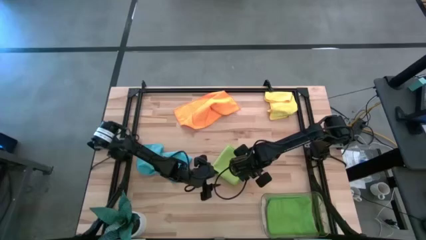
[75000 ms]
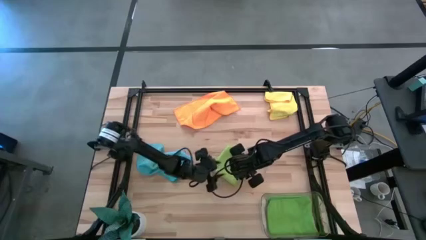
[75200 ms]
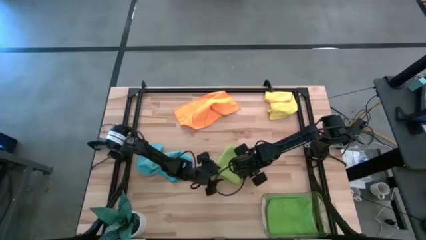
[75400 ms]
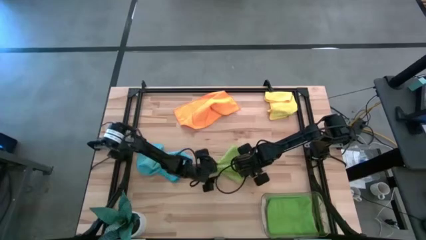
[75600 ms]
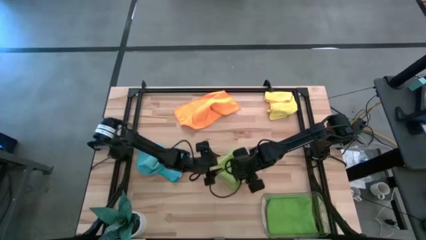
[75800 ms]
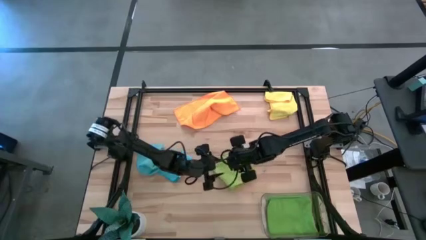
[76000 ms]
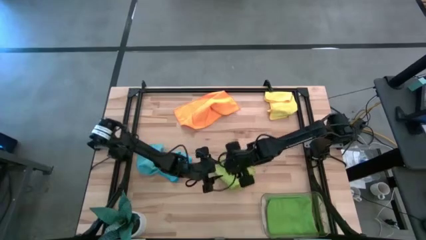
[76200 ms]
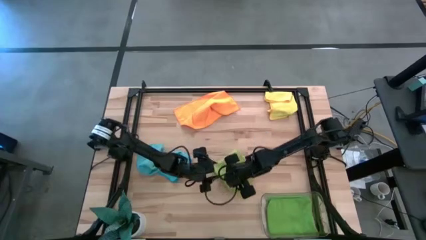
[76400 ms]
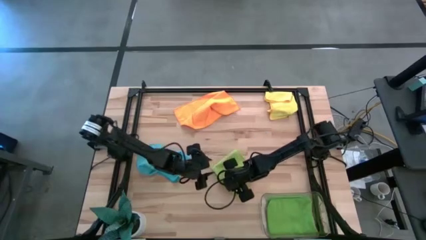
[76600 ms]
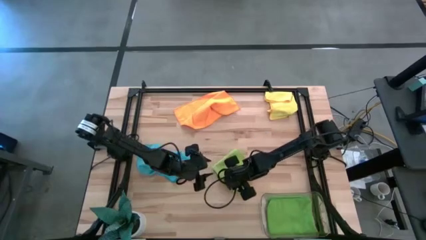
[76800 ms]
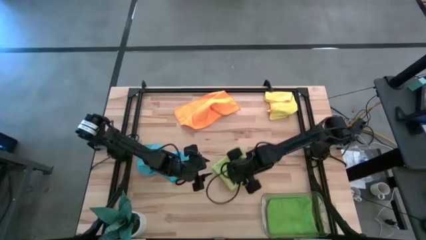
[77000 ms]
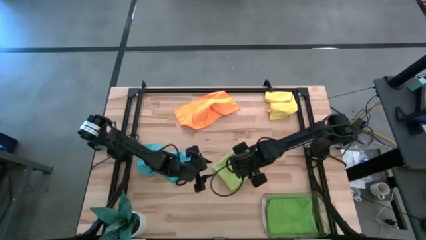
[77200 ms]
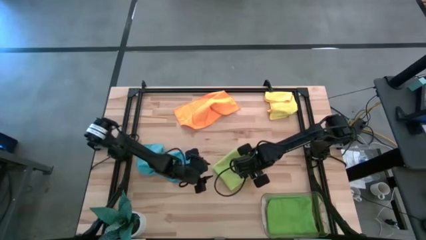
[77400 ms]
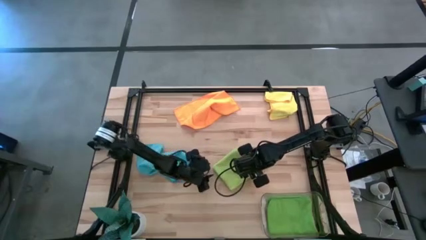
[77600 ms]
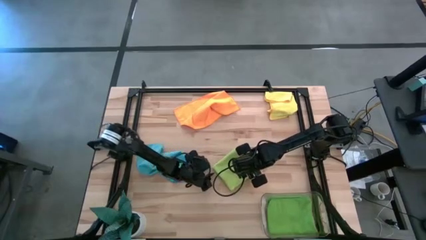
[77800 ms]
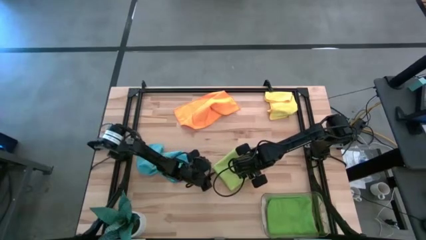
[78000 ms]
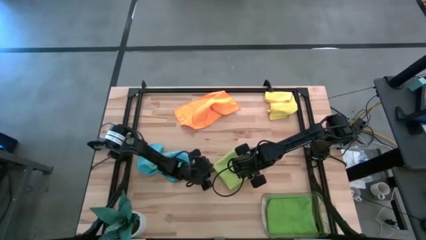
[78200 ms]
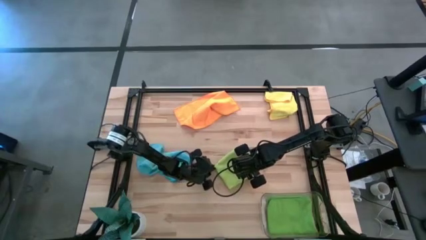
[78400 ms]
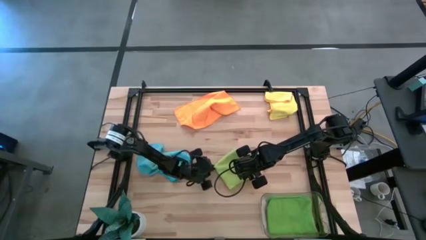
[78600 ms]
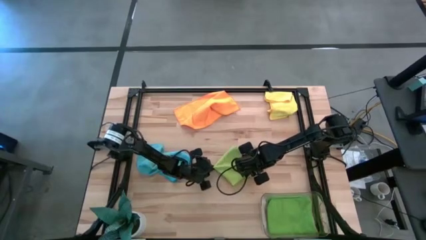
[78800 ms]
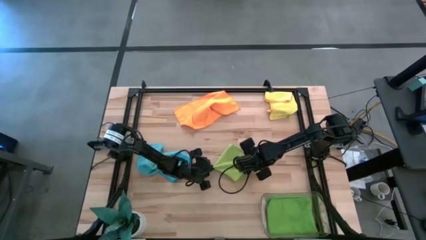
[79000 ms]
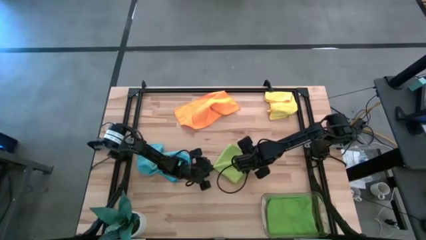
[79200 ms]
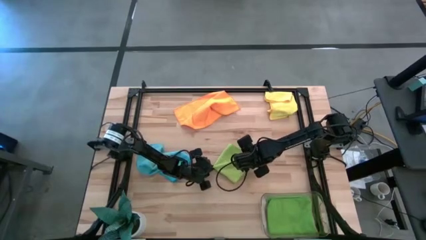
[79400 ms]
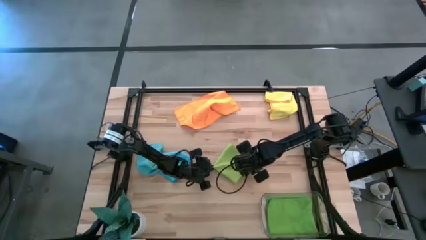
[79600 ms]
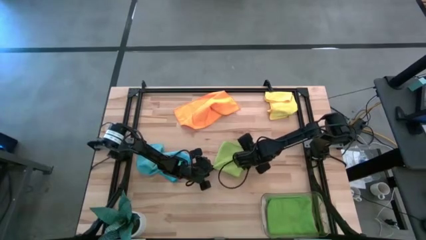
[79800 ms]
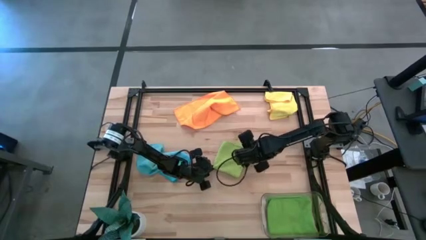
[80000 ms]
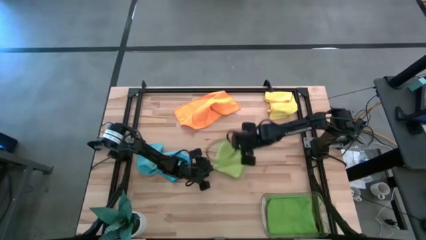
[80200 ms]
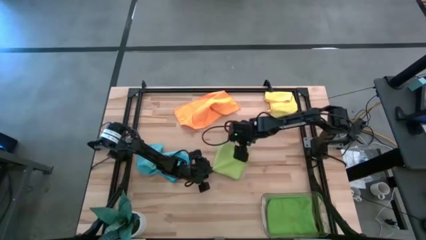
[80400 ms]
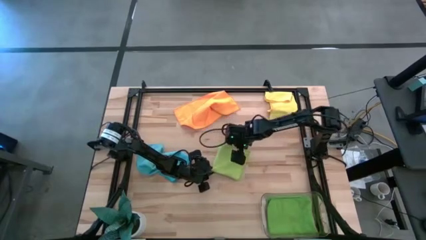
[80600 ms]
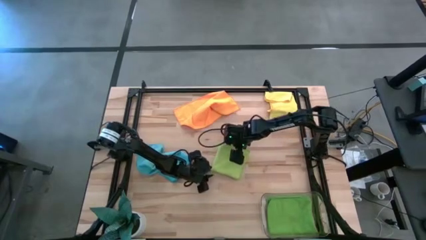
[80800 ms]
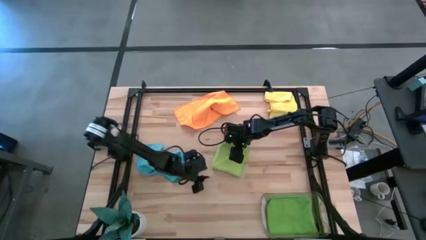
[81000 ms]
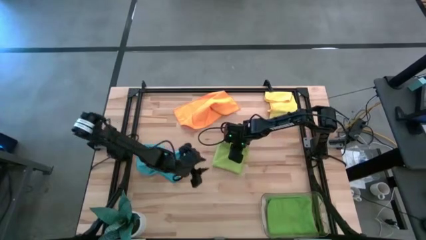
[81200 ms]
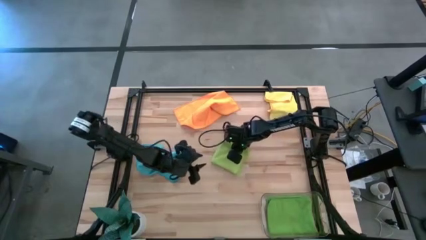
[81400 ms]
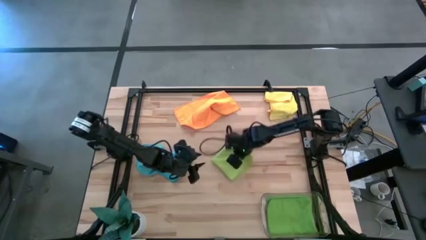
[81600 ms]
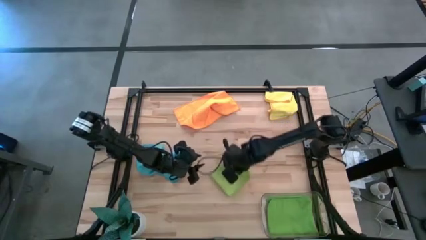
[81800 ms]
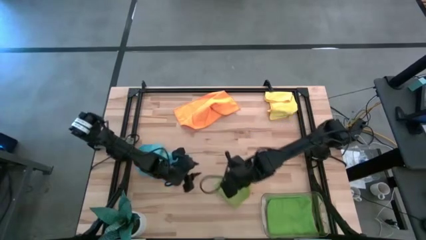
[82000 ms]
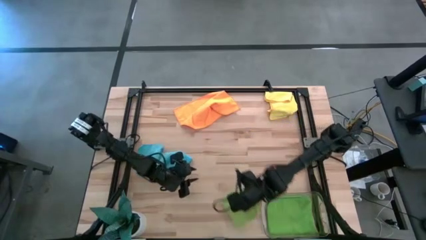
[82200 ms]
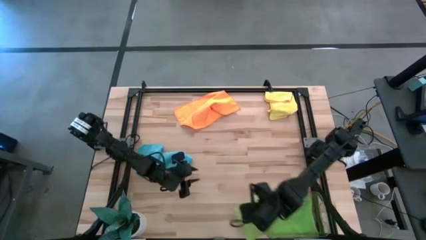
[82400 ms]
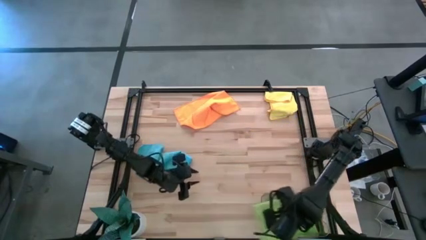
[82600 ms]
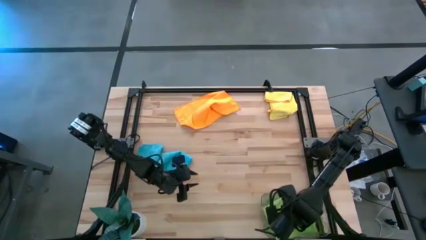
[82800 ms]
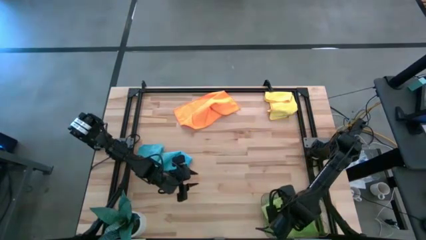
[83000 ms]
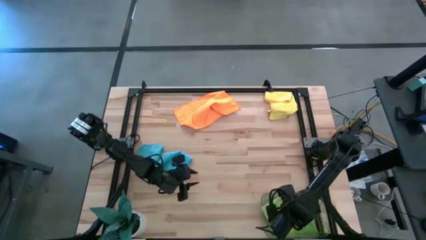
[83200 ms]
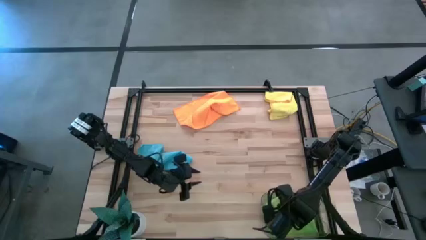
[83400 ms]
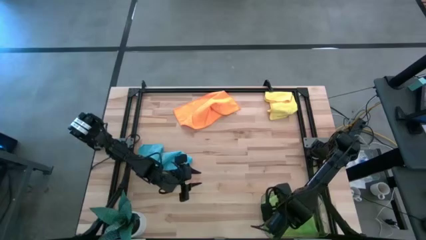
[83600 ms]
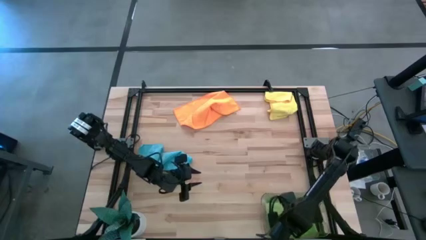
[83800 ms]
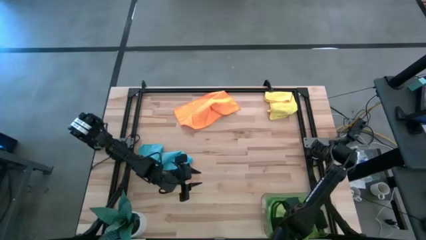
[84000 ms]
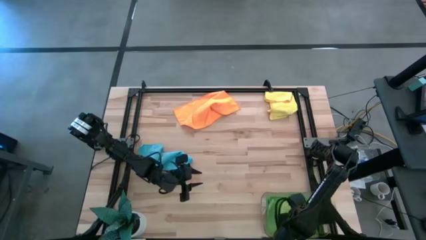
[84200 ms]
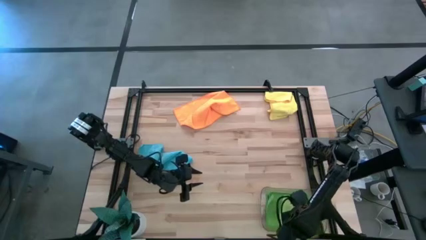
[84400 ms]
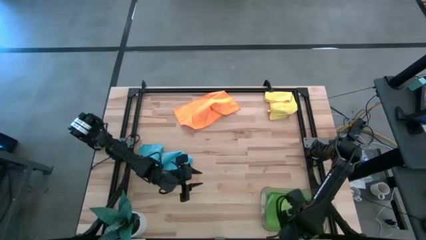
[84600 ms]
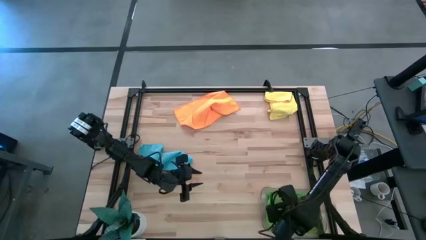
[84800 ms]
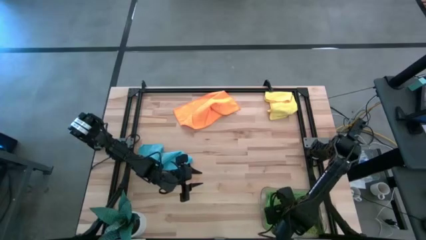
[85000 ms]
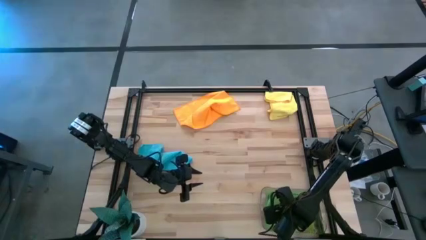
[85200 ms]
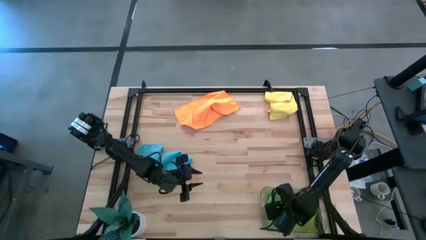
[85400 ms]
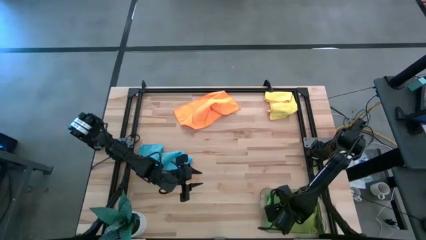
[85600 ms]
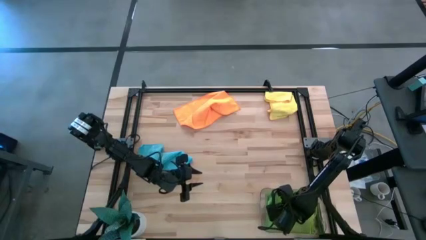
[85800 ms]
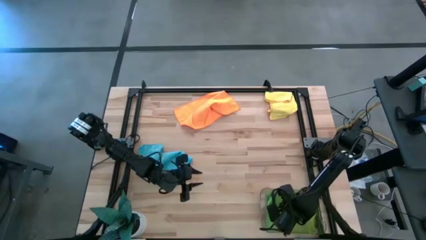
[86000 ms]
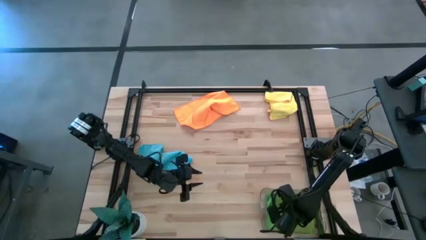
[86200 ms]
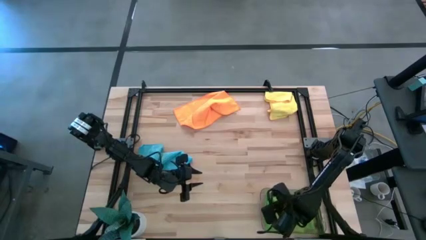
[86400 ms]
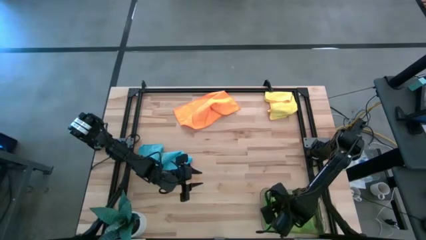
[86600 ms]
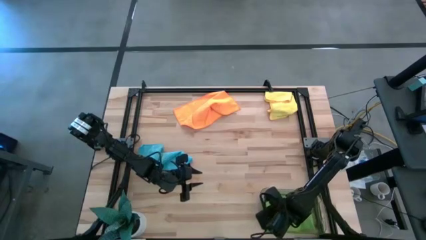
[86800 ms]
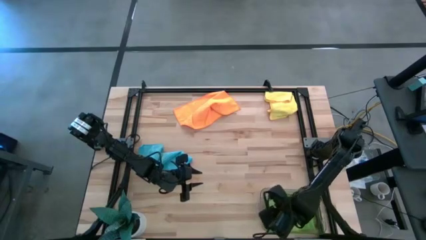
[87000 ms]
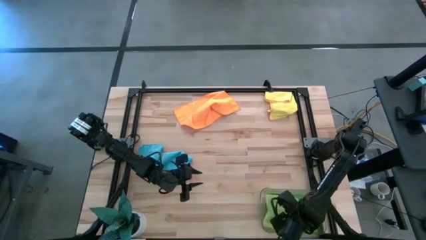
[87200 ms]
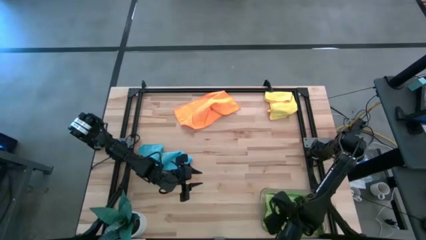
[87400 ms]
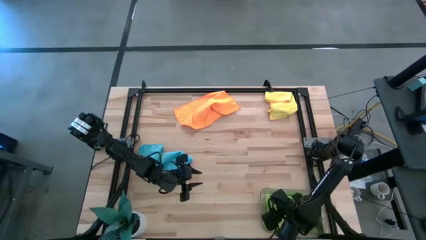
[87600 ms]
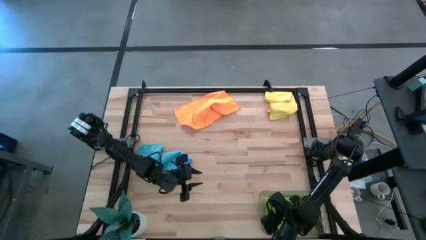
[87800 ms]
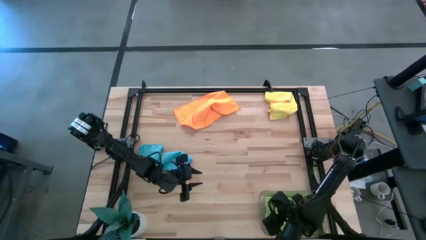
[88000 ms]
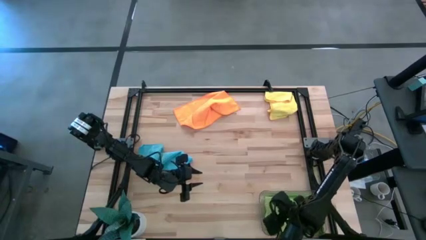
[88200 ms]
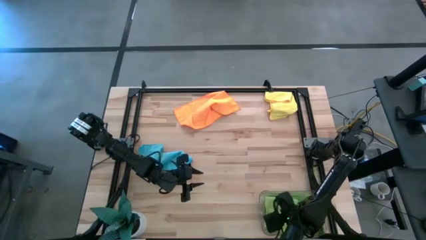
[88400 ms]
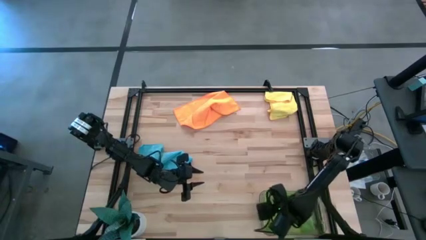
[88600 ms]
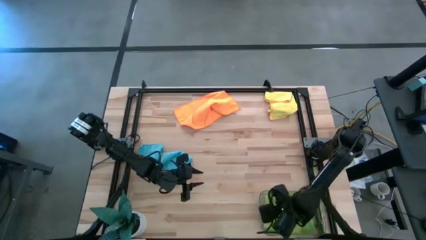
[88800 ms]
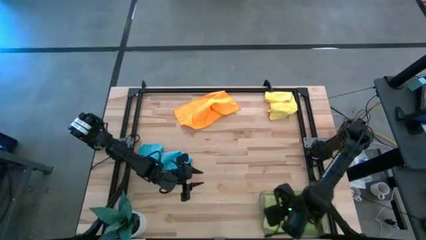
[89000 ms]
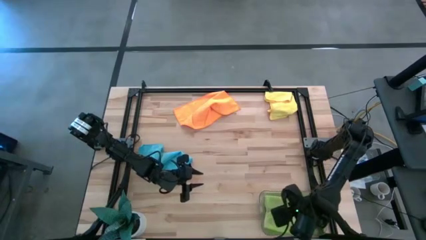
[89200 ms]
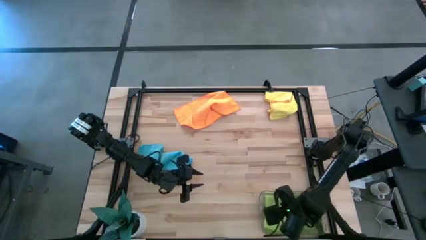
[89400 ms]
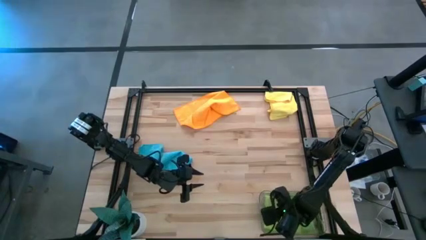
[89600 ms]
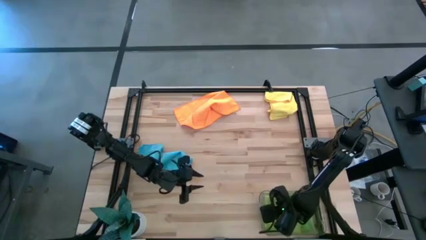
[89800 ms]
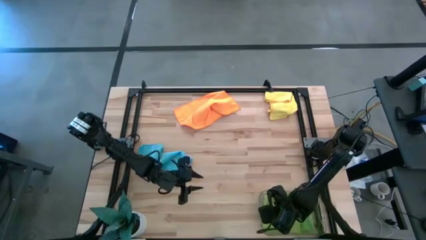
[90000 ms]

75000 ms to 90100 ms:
Task: Fold microfiber towels
Put the light green towel into the transparent bin
